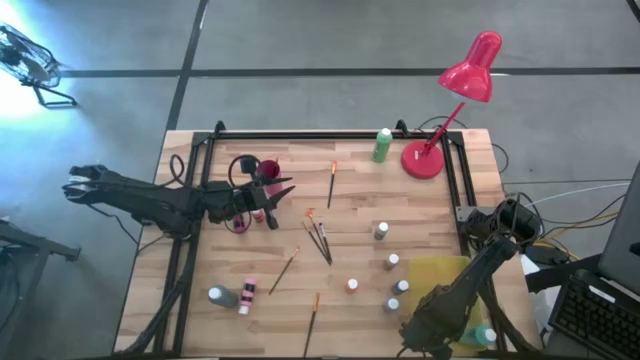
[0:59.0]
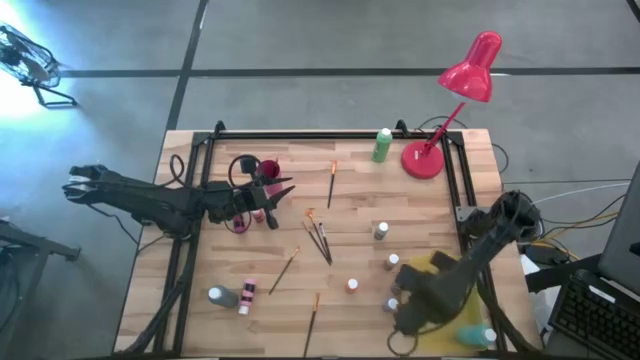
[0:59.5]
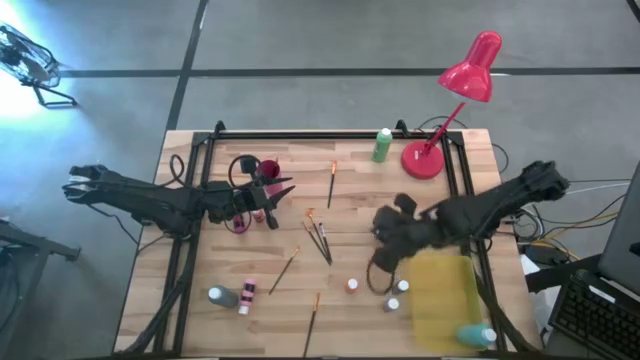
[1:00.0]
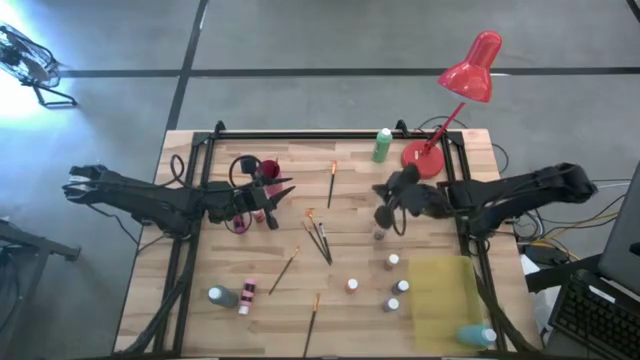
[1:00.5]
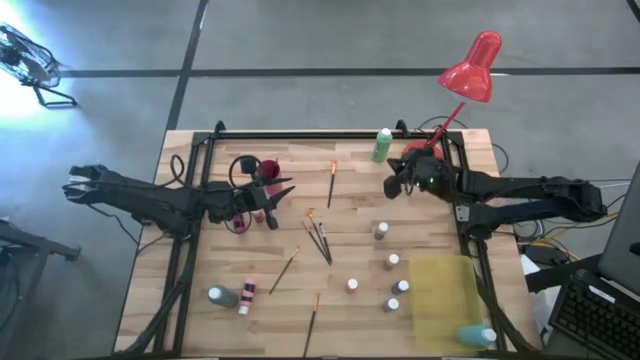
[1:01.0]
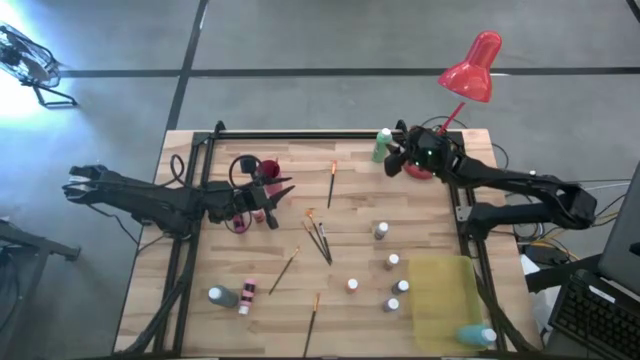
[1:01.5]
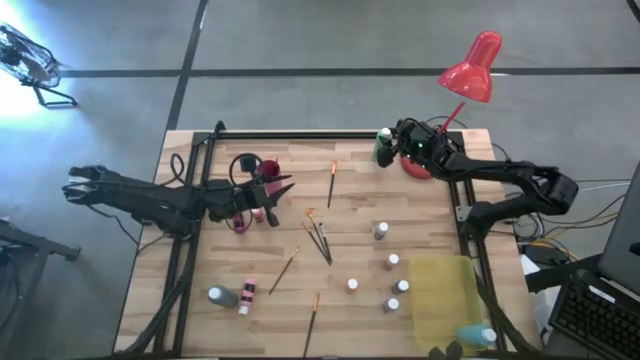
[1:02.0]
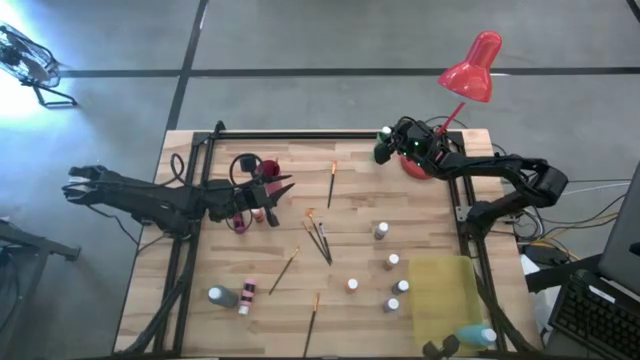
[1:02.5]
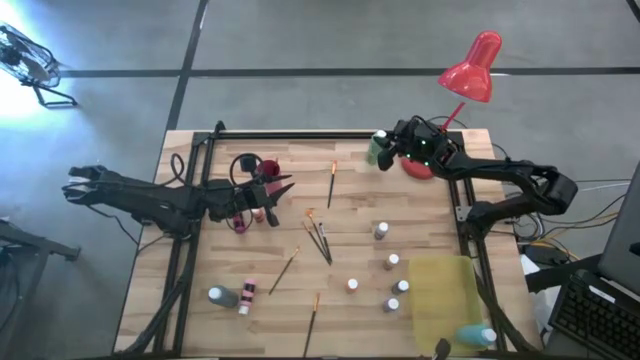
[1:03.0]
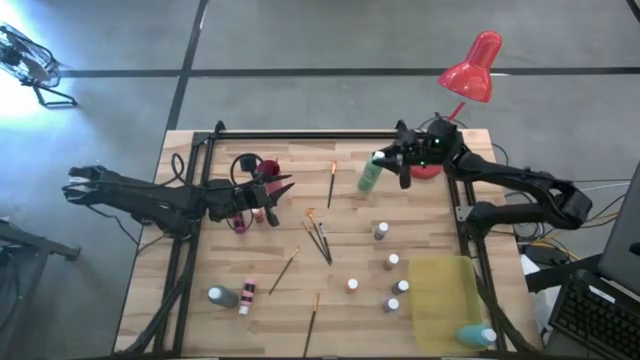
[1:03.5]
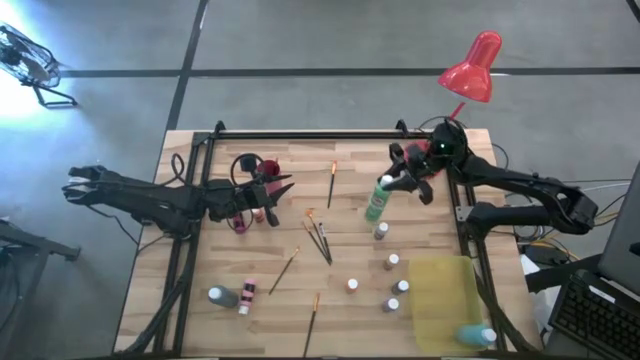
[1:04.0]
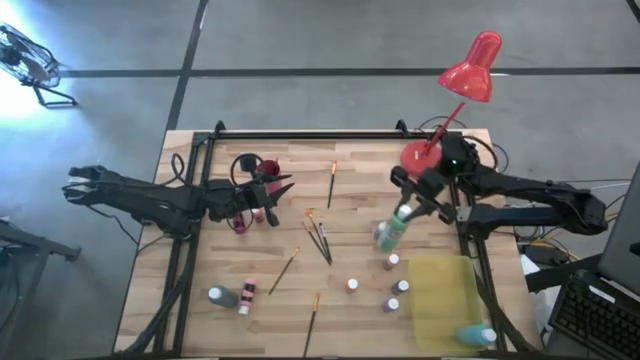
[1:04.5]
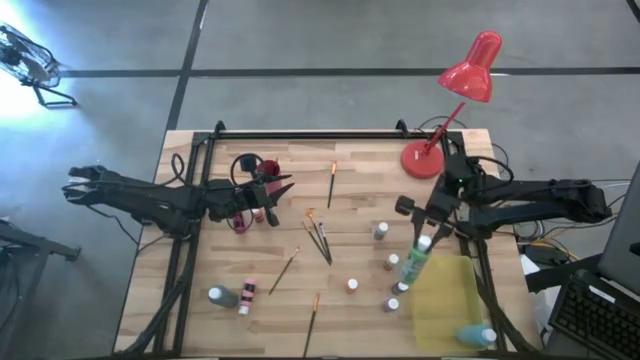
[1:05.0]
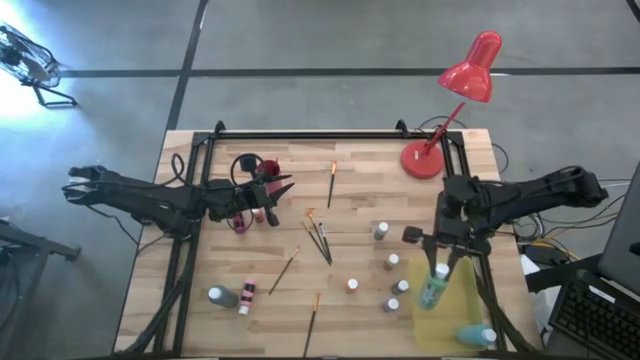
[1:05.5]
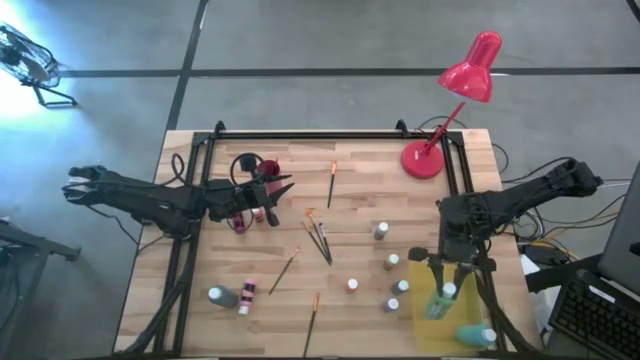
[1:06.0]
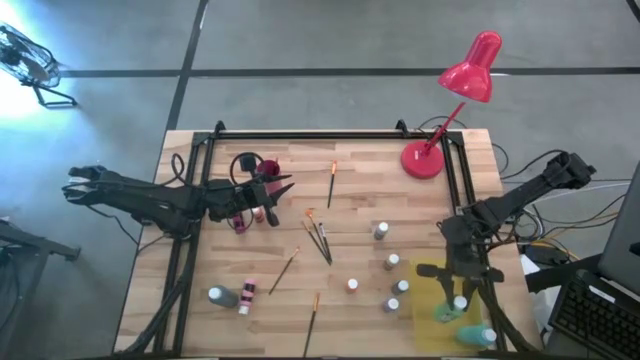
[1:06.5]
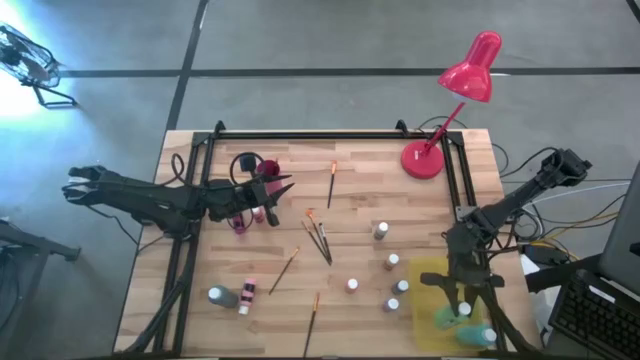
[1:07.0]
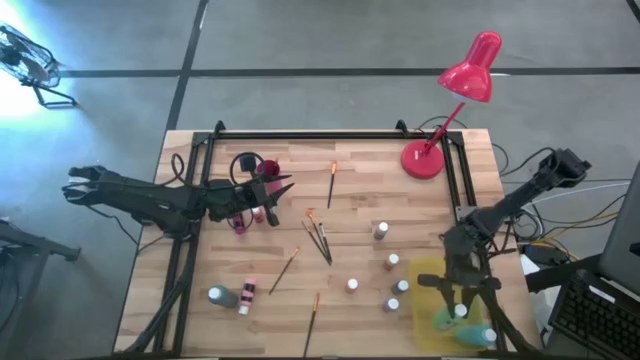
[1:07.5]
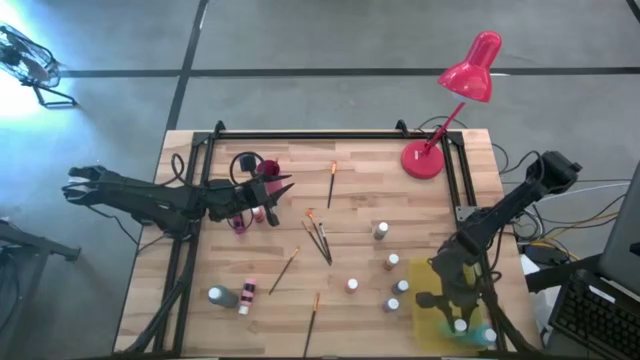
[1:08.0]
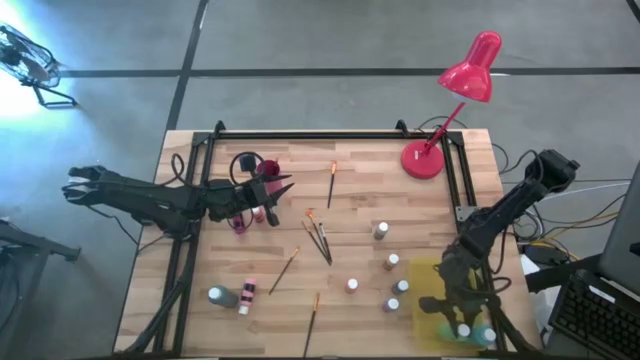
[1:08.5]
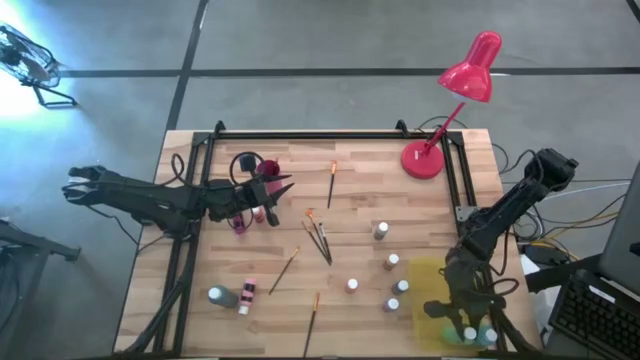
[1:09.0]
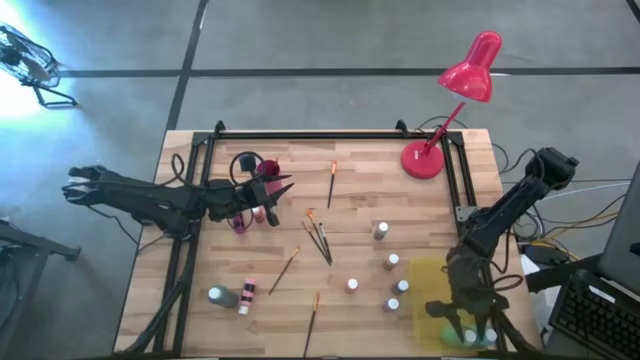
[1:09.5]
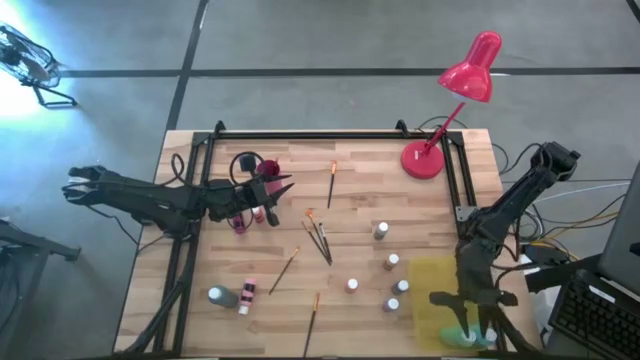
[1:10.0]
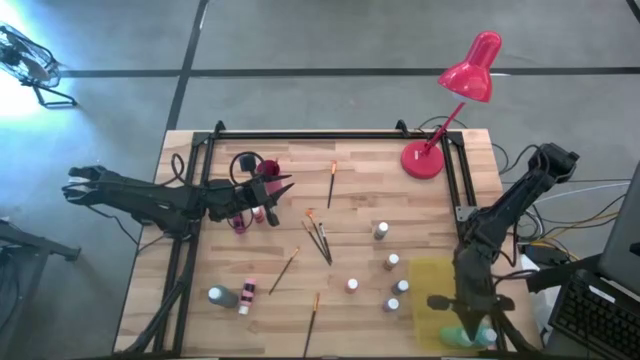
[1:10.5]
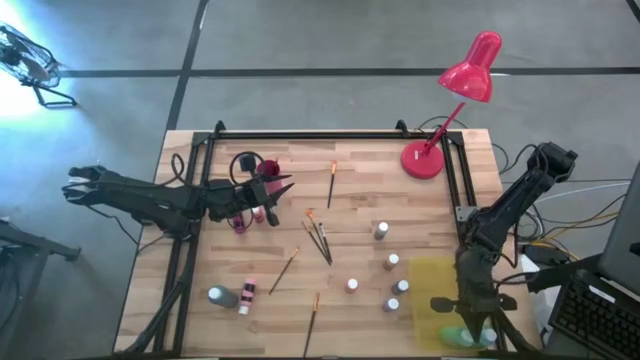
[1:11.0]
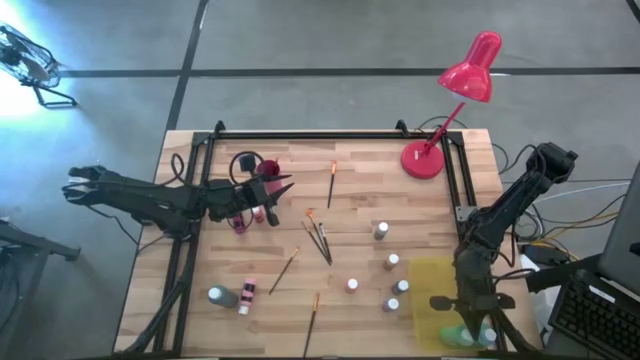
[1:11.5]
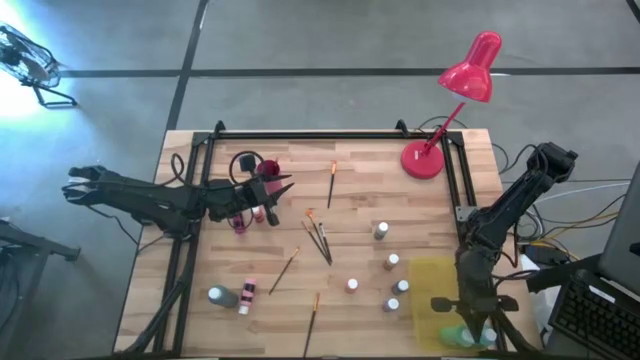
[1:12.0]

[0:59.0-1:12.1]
Task: Pick & Place Paint Supplies
Put the green paint bottle into the yellow bin
